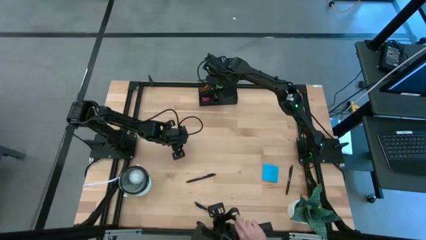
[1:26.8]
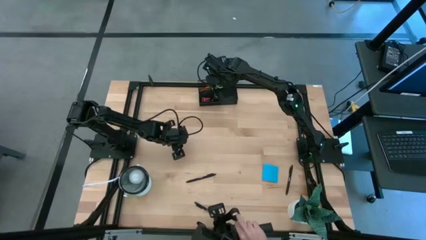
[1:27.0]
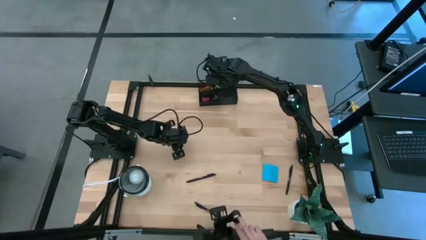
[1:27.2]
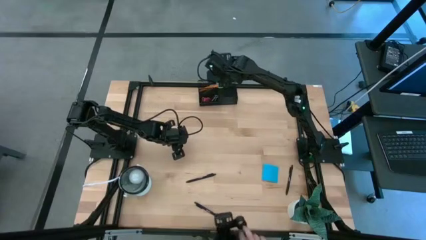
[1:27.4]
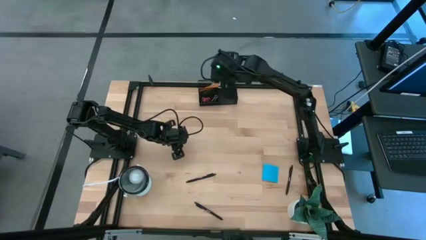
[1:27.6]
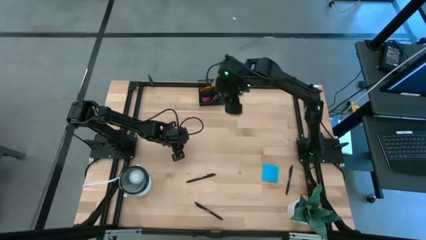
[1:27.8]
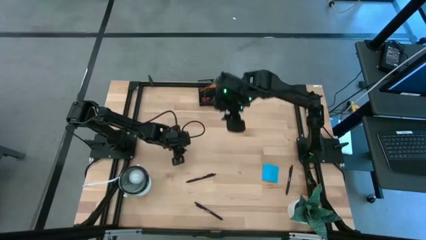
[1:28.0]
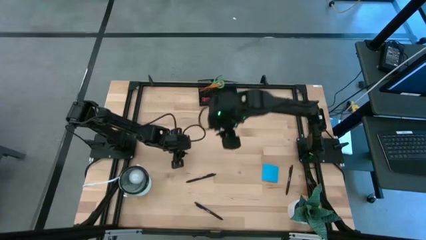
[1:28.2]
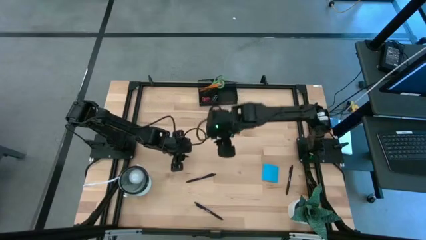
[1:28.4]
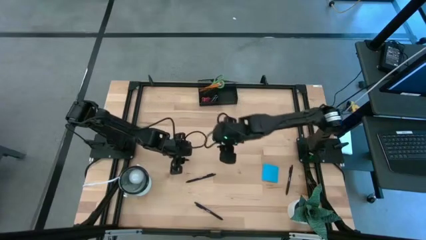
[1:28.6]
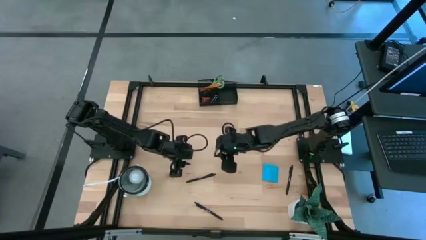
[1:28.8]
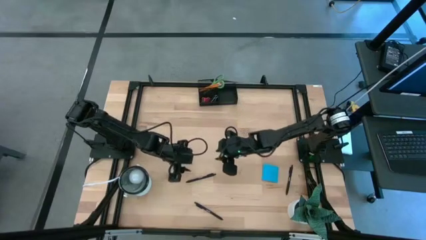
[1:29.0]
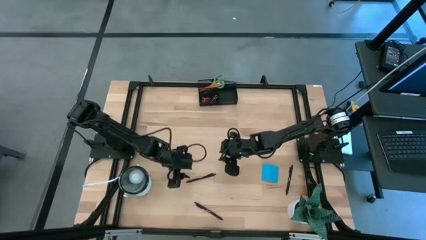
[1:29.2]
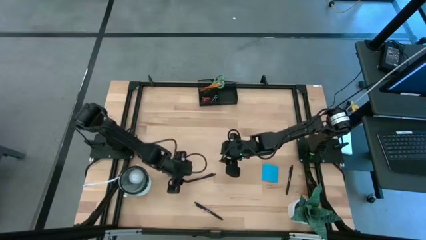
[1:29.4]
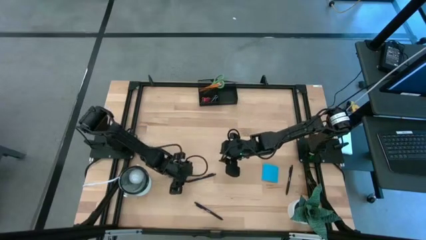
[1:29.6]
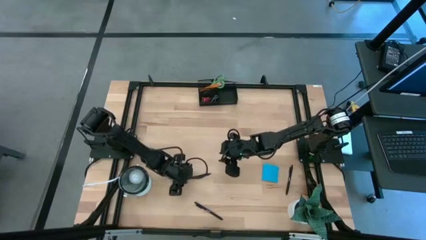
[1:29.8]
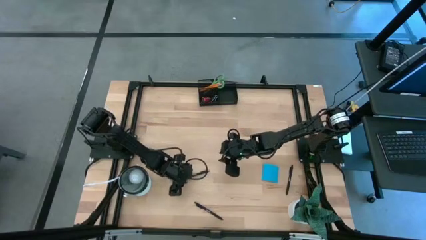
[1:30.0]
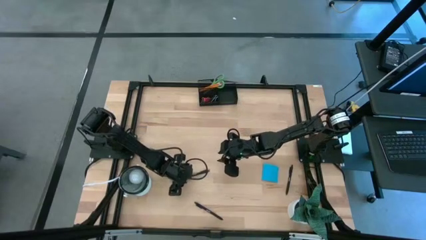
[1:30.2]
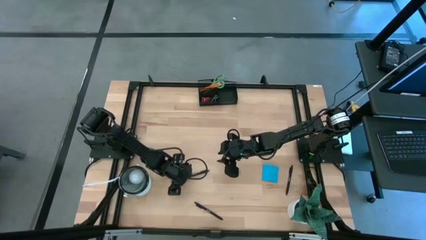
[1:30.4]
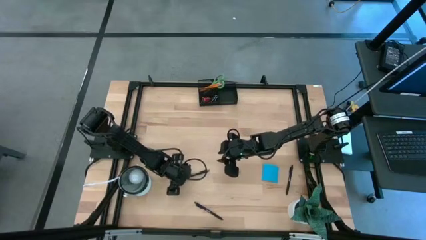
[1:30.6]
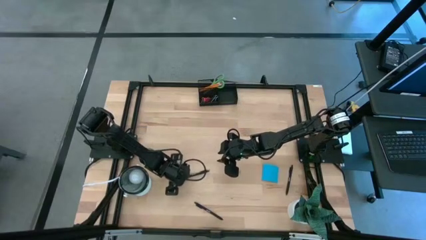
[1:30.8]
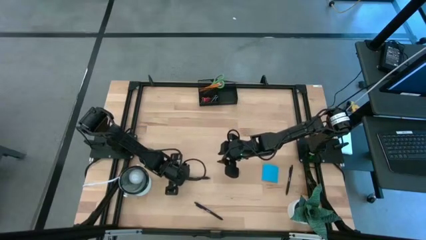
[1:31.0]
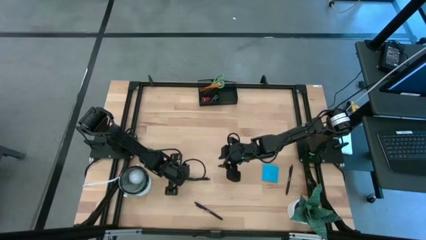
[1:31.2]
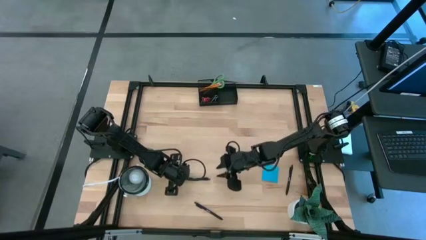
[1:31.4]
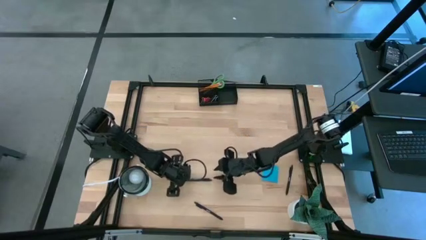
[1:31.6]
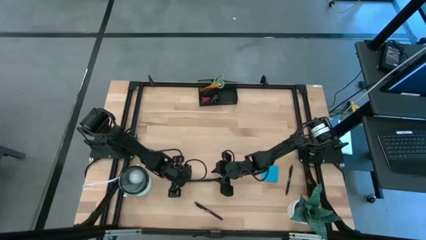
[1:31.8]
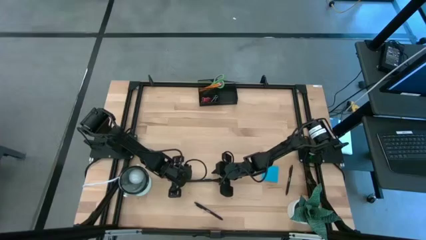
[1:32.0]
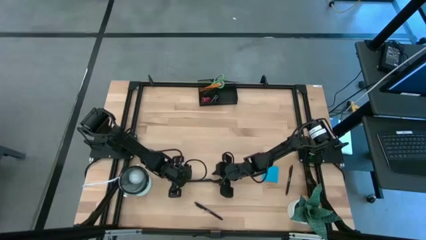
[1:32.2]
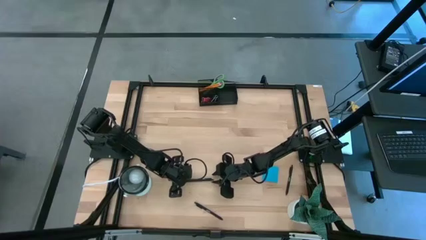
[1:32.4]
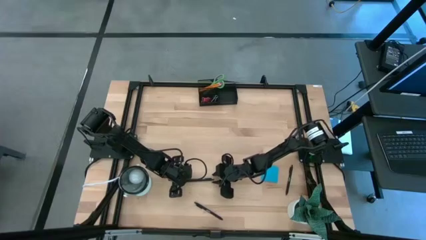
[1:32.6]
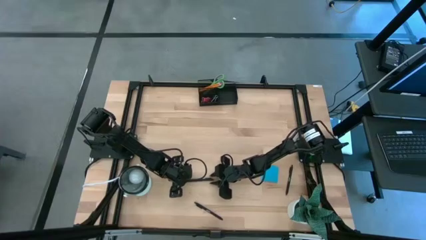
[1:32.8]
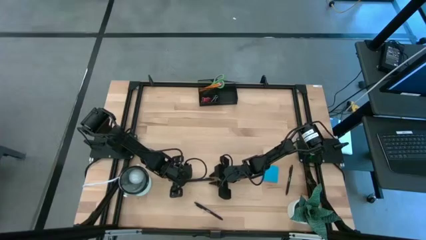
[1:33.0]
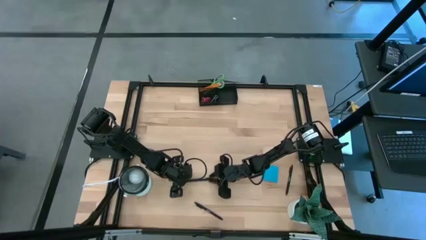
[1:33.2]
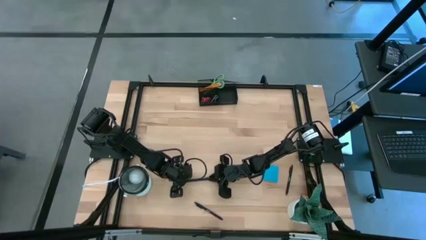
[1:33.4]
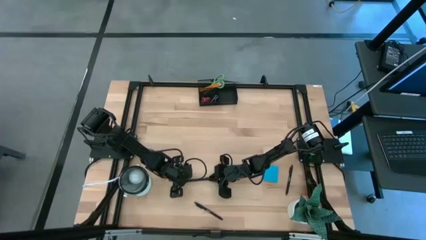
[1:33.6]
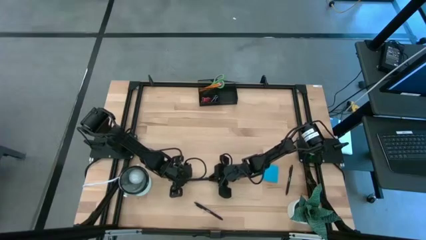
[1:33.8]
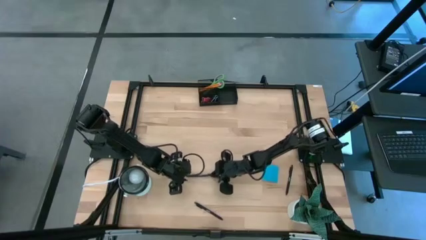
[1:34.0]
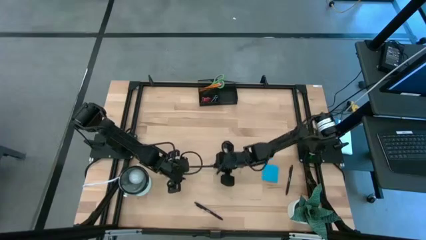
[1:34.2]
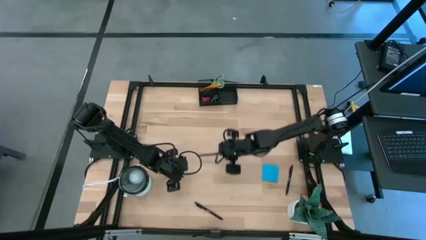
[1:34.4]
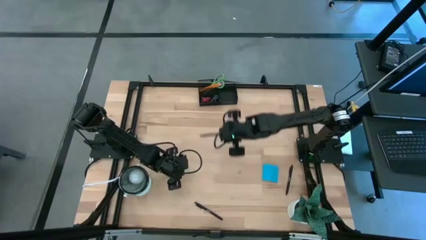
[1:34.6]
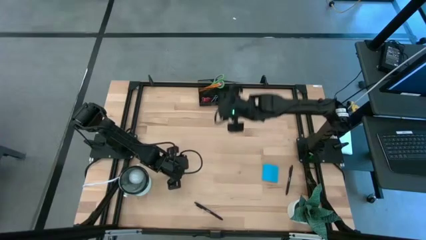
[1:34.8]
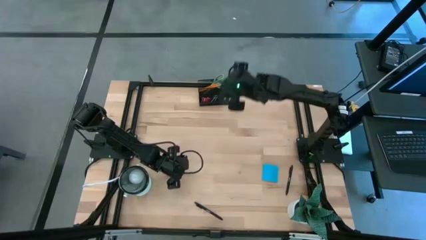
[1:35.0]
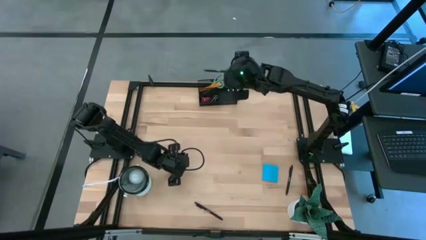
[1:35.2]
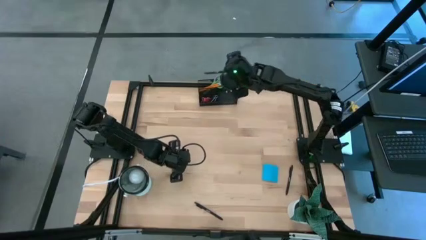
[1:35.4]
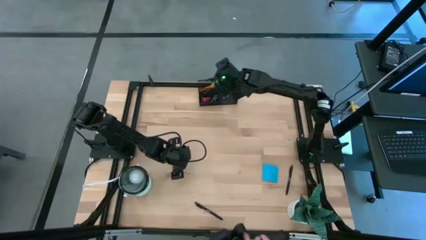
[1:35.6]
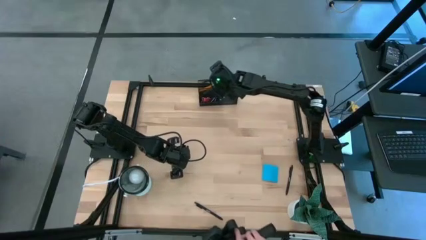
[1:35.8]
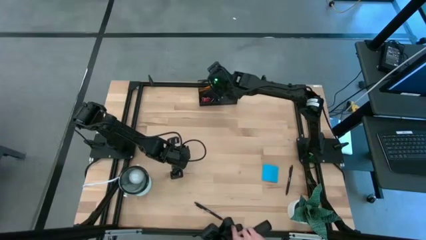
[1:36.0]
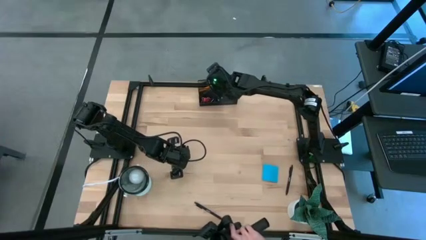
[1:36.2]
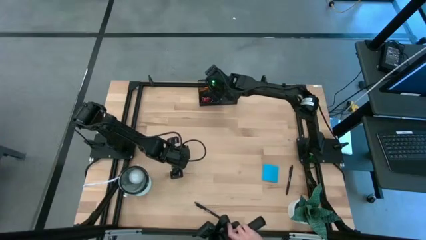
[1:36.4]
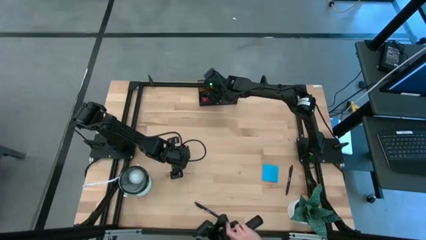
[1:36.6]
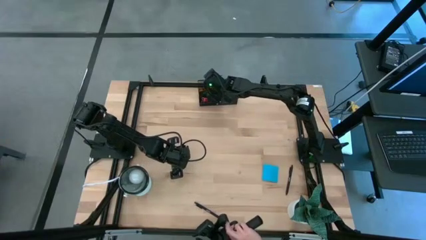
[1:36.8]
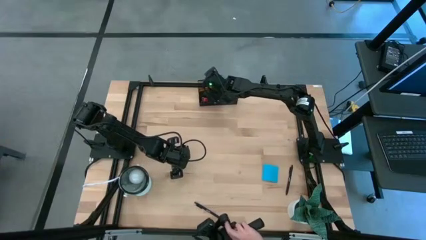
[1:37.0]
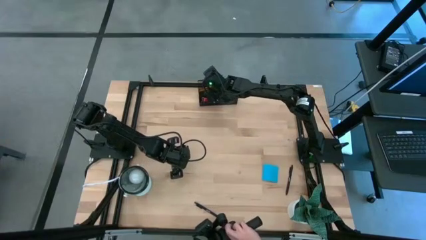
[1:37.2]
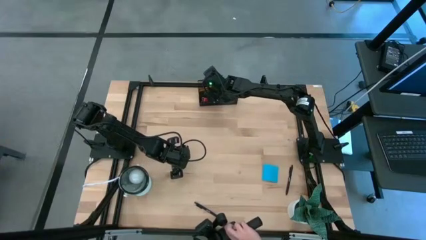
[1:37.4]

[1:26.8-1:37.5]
Task: Pick and place office supplies into organizer
Put the top left black pen into the desk organizer
